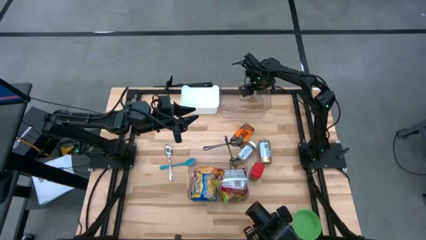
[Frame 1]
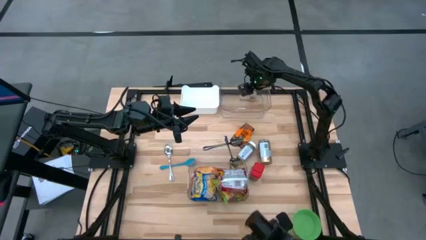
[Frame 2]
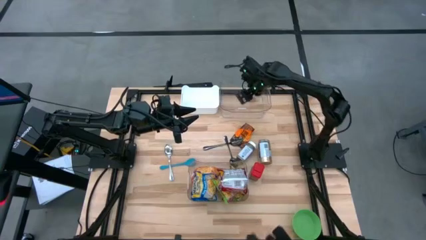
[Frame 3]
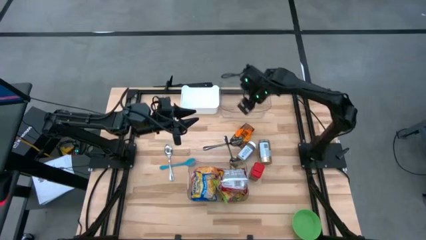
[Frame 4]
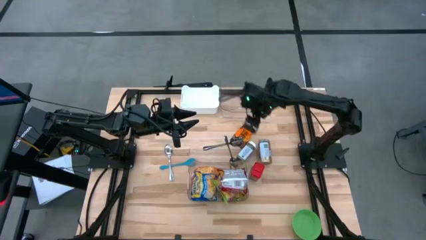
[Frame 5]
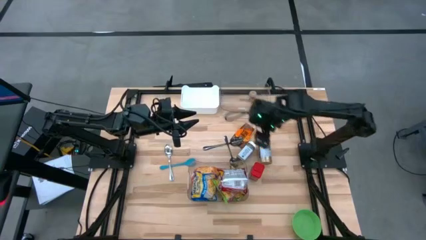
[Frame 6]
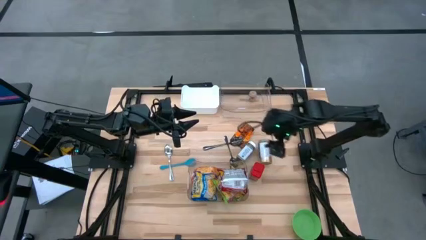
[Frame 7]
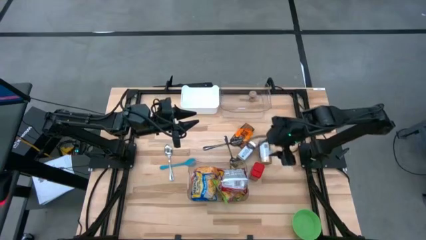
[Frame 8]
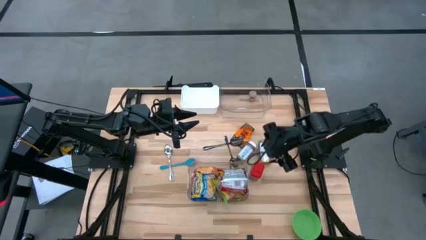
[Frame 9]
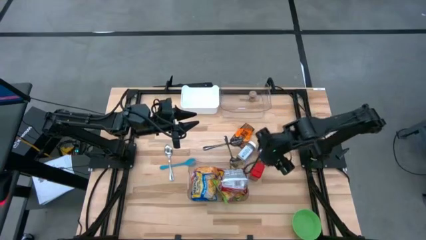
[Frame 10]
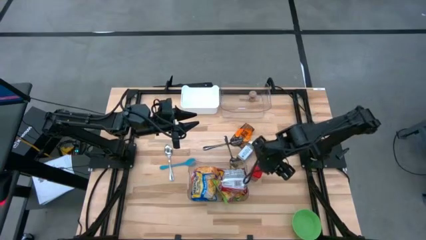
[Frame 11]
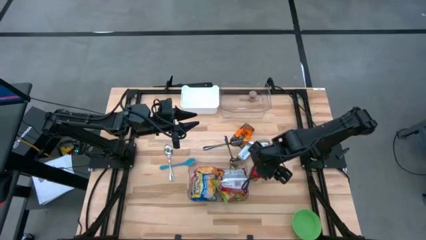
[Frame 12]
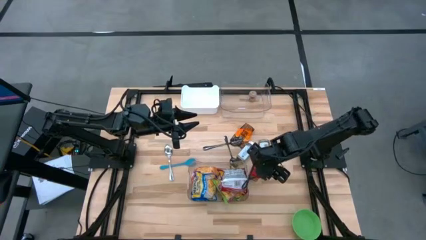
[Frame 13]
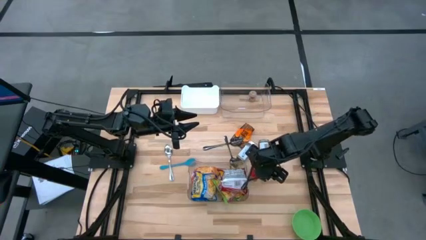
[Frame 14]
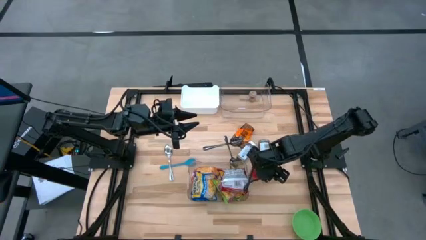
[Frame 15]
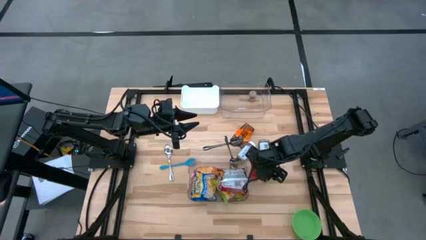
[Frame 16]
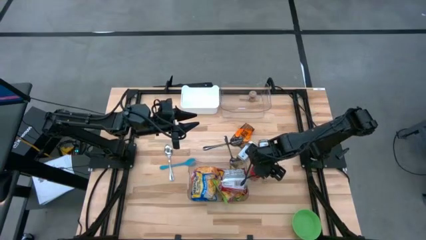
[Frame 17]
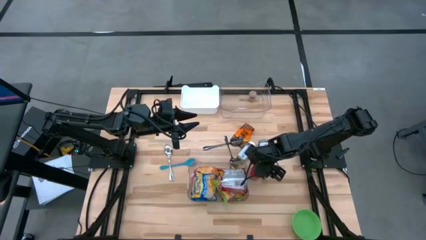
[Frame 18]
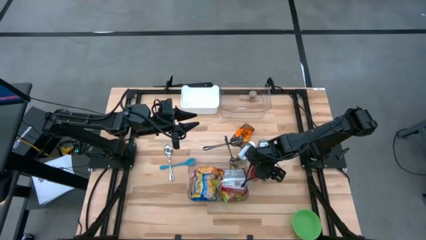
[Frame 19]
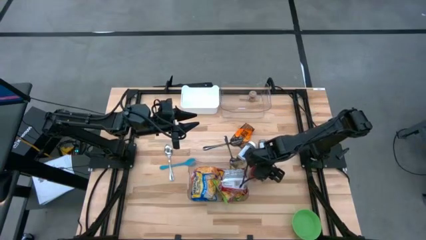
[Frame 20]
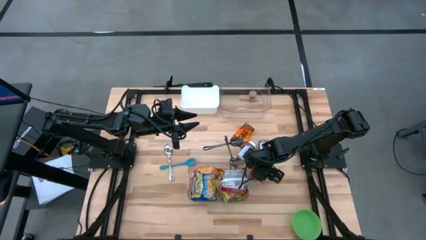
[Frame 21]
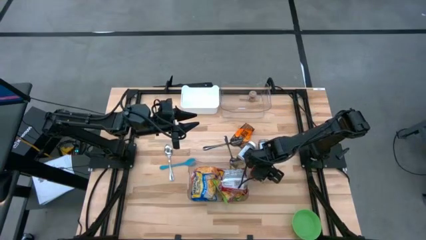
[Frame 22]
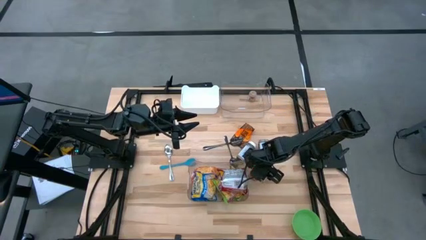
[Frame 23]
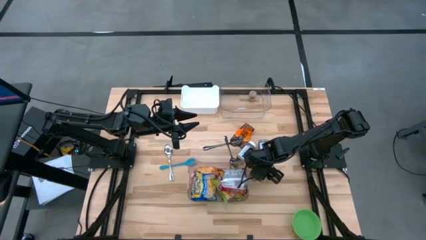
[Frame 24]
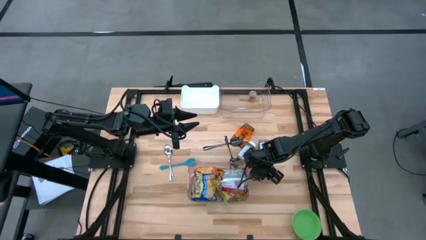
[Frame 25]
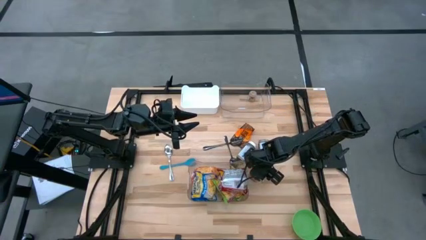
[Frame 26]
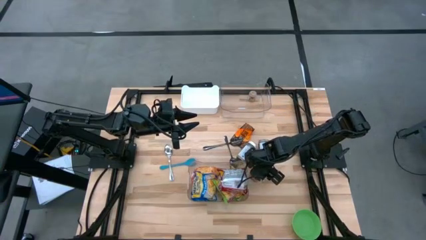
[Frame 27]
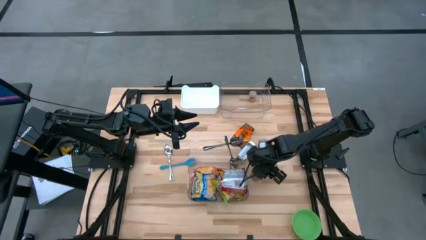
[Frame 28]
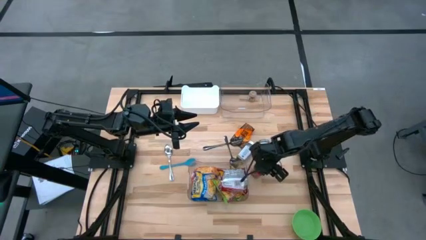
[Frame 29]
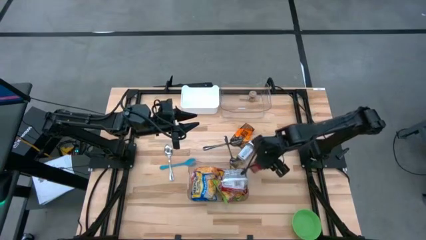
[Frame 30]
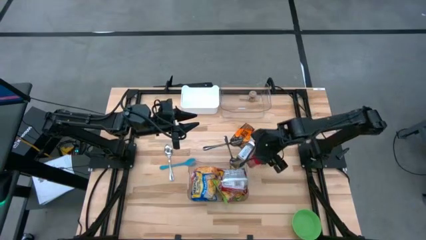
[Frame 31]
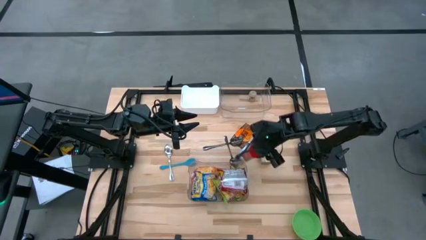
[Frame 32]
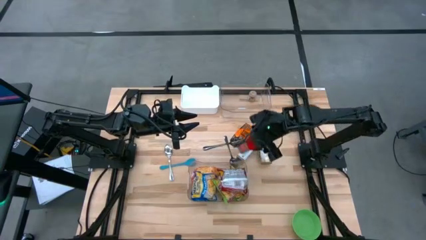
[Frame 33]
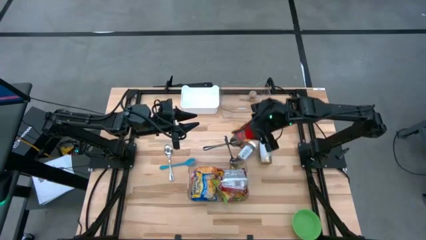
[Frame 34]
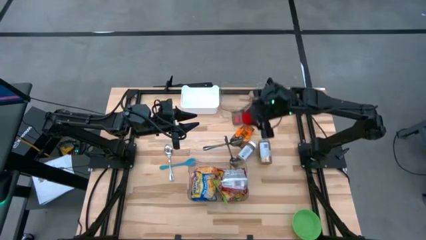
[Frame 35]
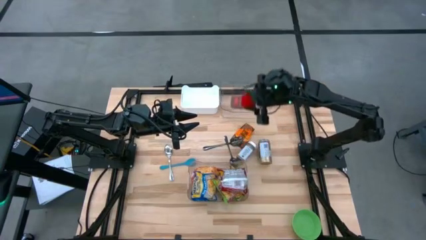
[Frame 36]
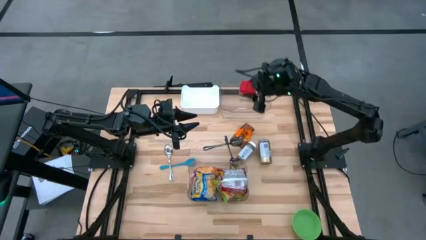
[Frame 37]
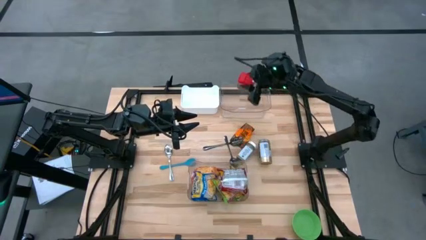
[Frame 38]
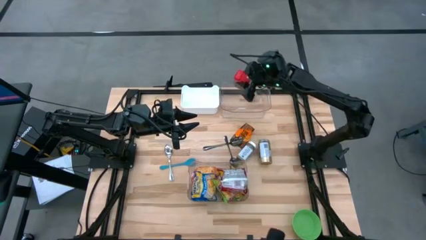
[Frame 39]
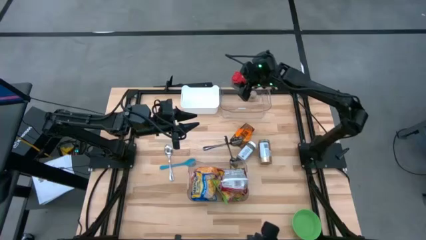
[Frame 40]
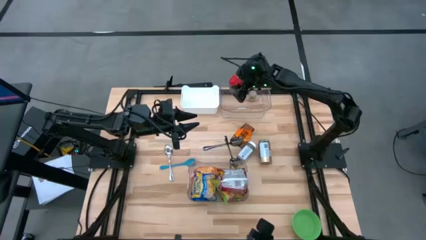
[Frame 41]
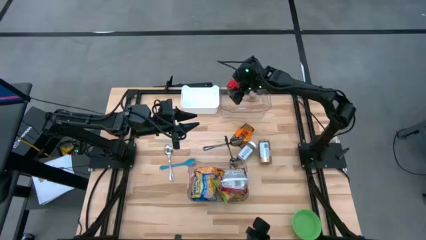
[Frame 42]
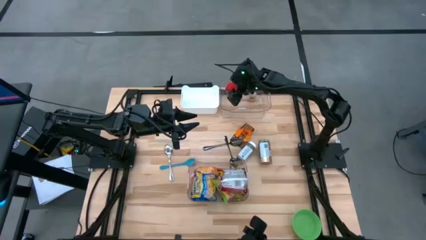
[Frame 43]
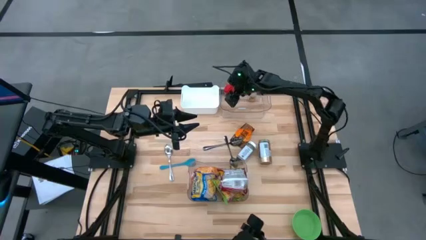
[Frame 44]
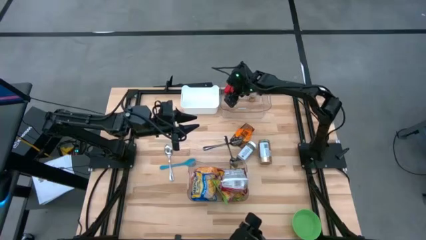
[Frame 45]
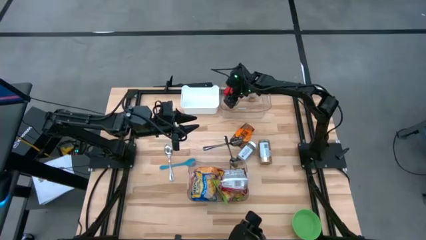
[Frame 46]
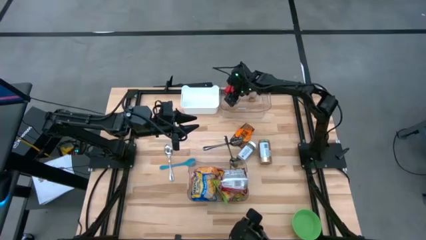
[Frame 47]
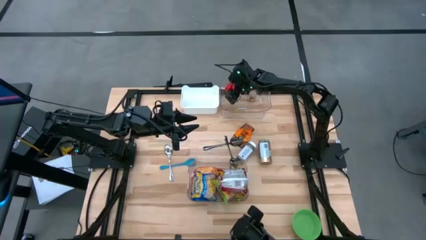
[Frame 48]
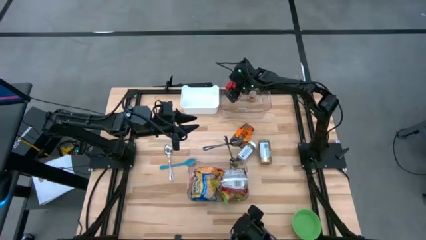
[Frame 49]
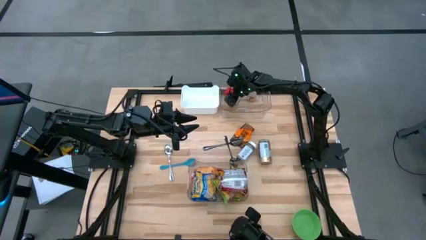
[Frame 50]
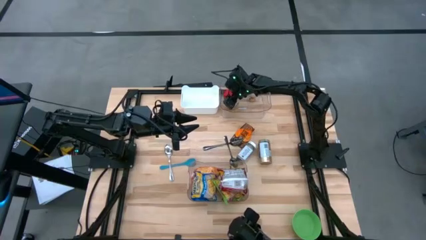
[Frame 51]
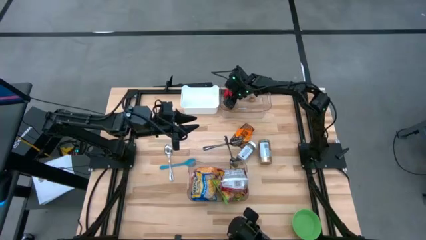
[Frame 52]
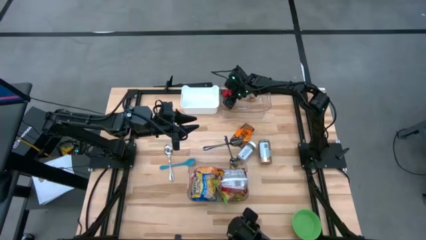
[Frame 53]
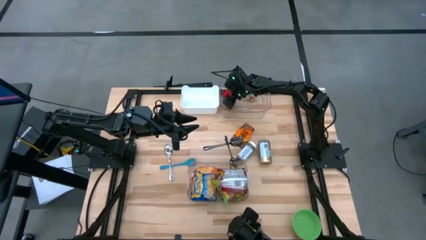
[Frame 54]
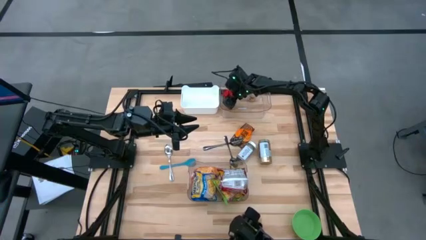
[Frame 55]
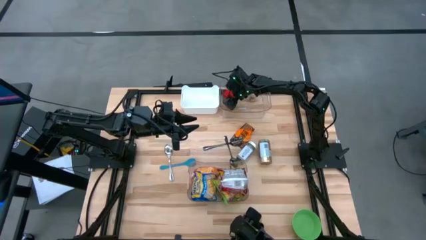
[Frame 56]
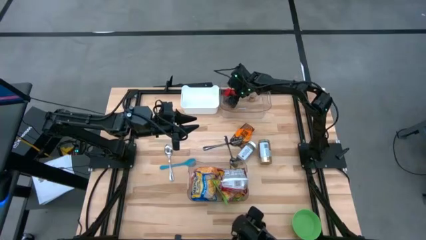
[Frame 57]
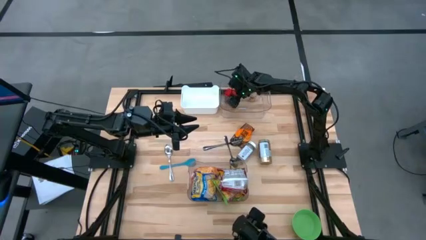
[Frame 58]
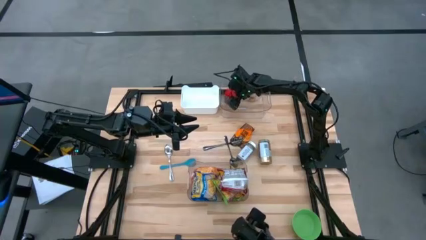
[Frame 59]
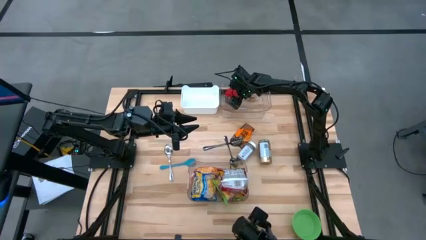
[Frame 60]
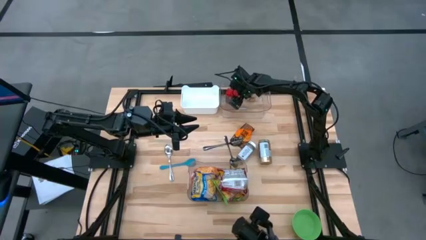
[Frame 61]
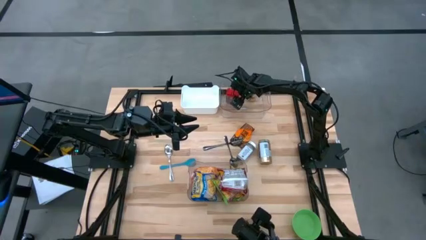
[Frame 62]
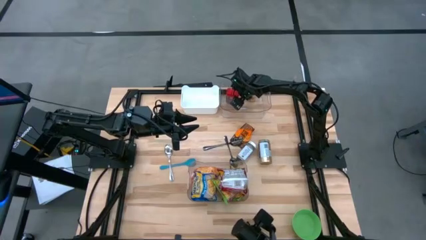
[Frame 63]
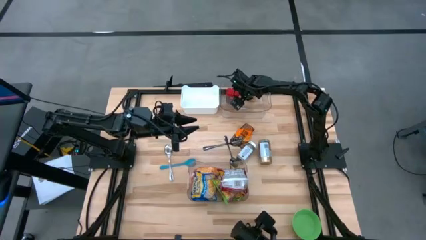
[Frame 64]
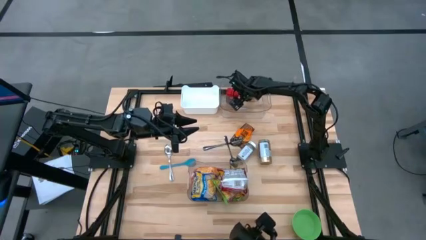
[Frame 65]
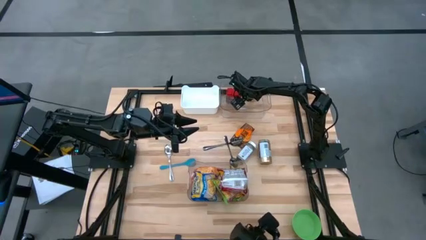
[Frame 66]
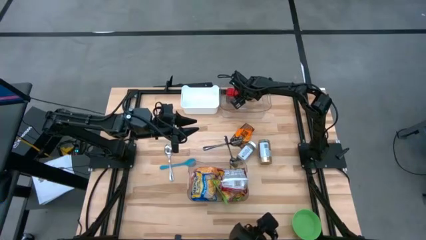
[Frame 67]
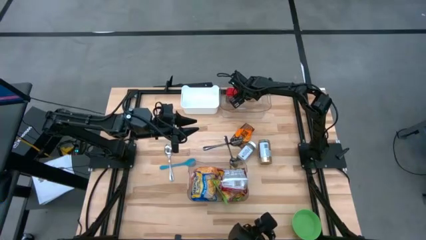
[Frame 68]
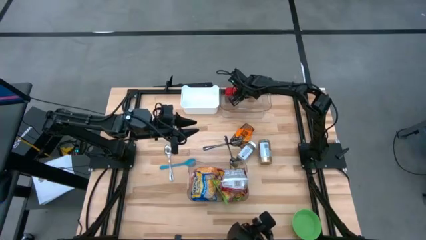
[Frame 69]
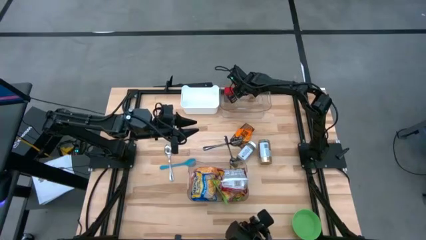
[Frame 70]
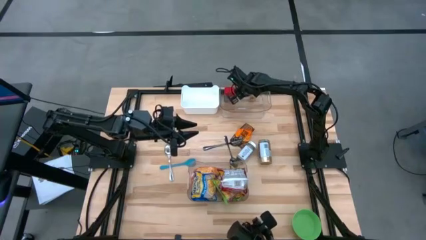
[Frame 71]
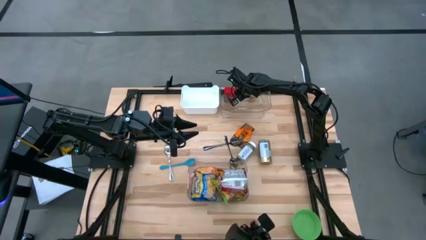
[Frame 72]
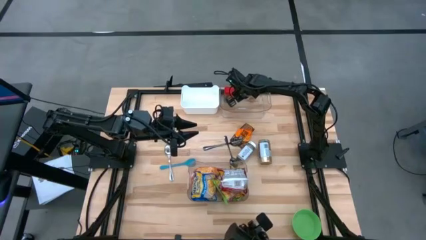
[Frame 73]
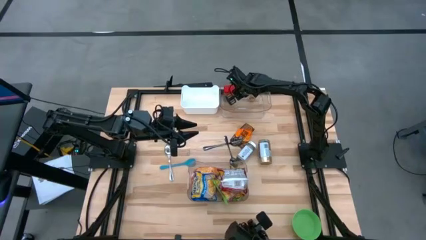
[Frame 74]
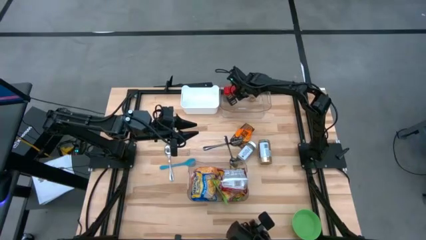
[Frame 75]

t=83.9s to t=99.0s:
Task: Pick & Place Food Item
Put the red seasoning into the top transparent bin
